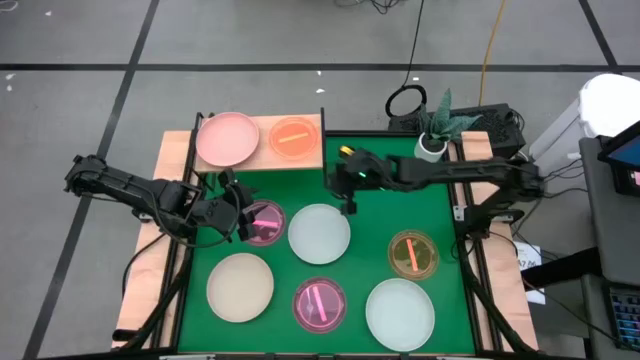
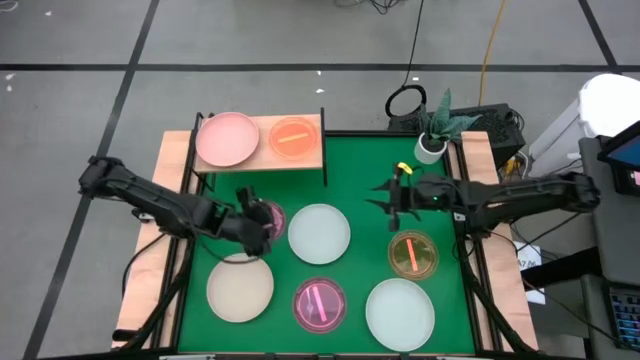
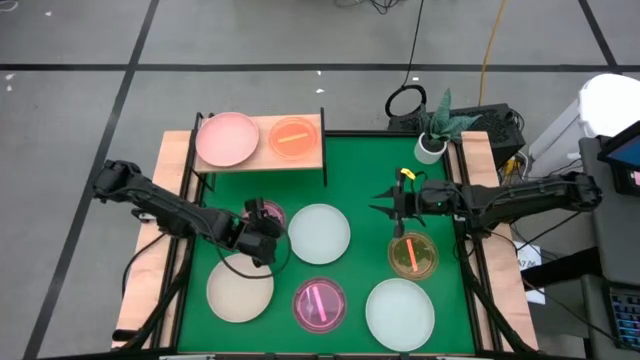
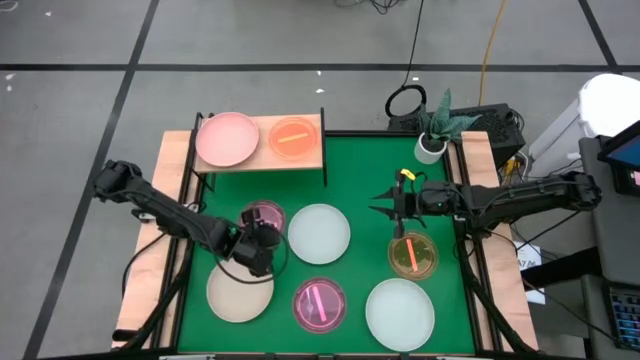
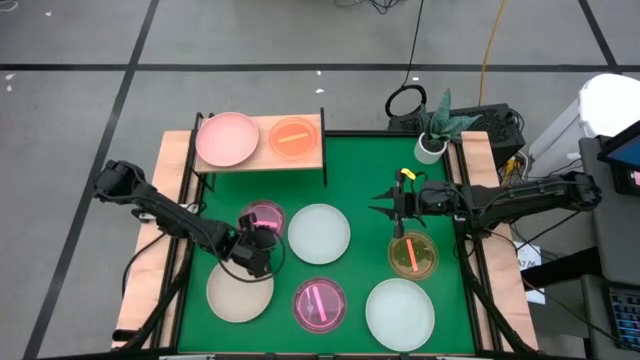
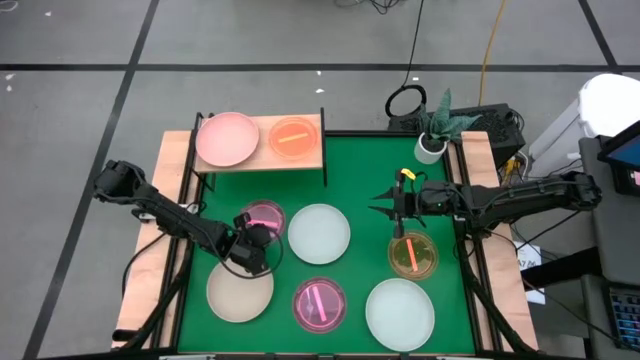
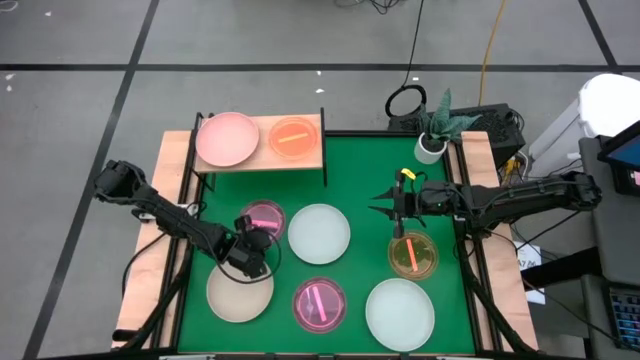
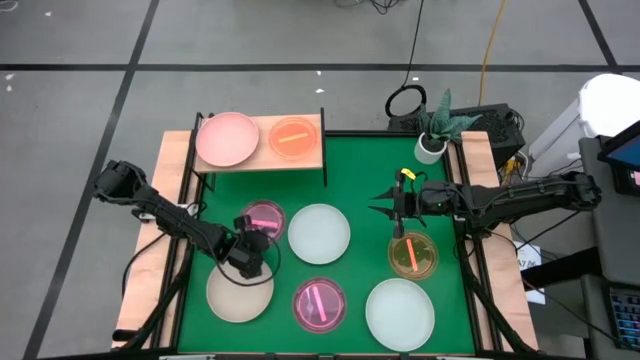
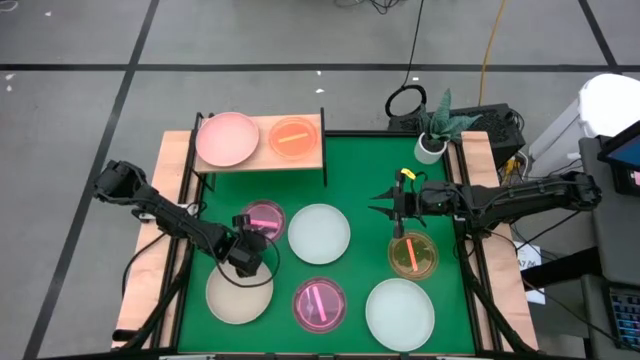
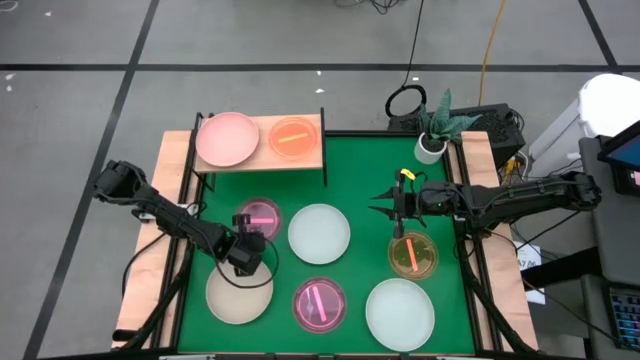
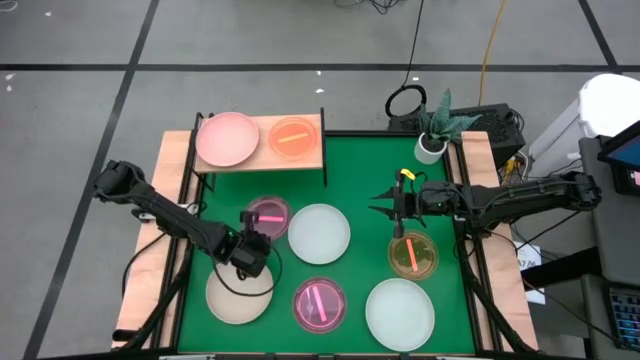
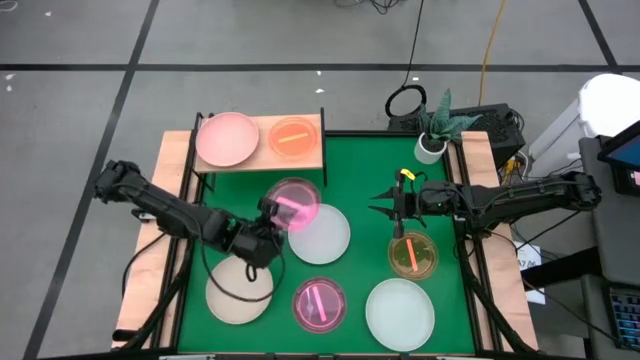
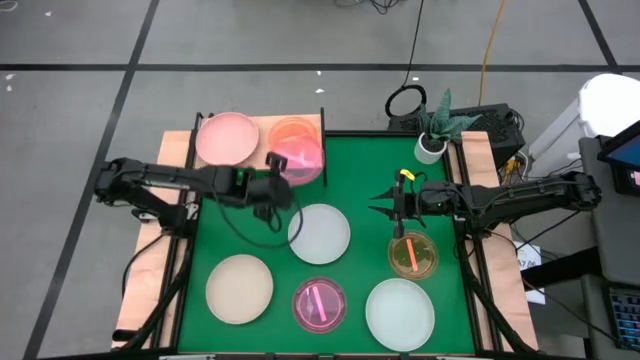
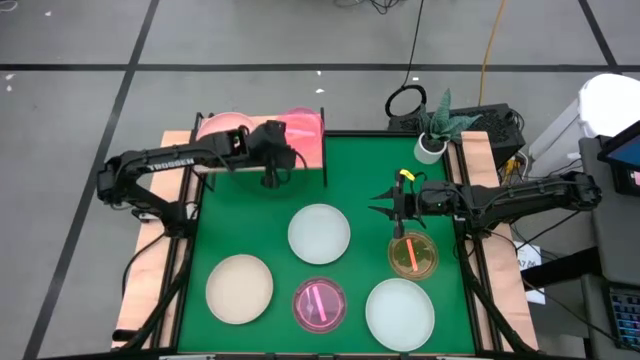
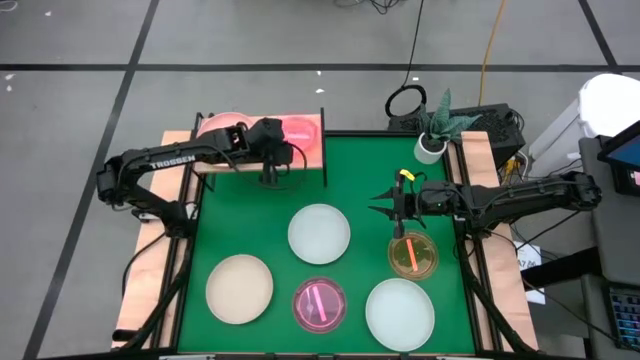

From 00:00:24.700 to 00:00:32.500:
Task: Place and stack plates onto a shelf
Stack the top pink plate on top of the orange plate on the shelf

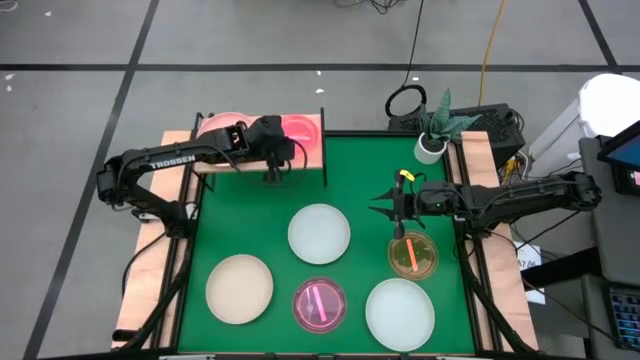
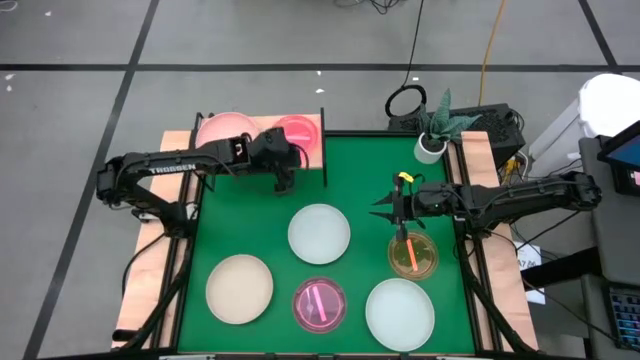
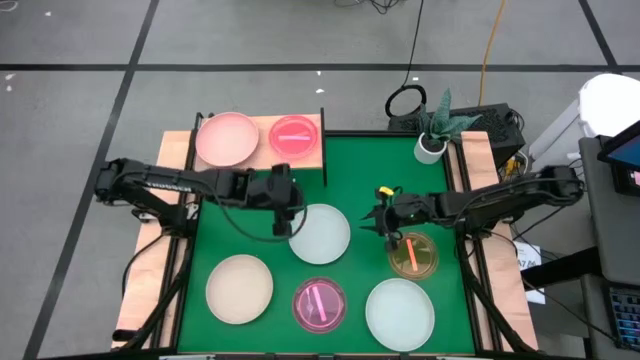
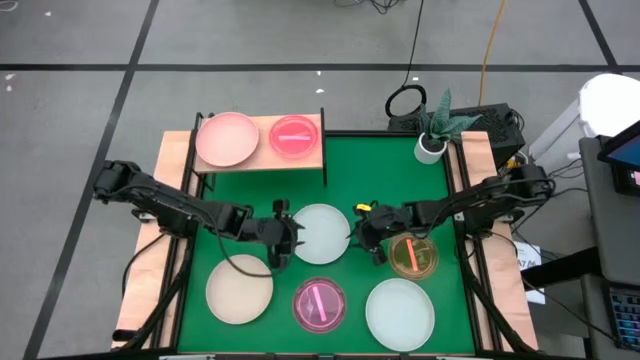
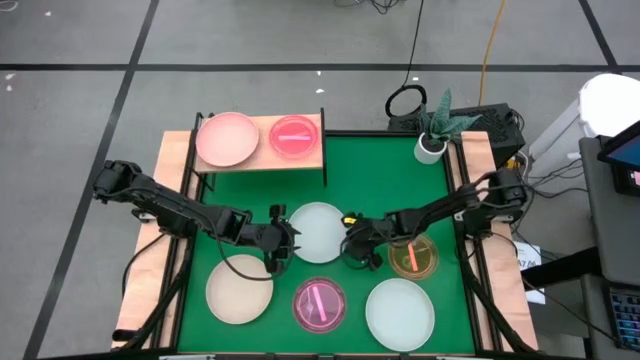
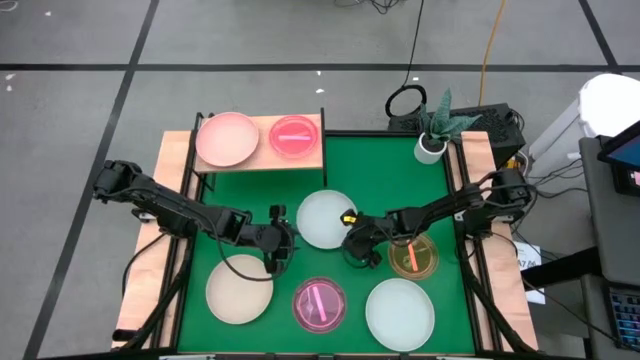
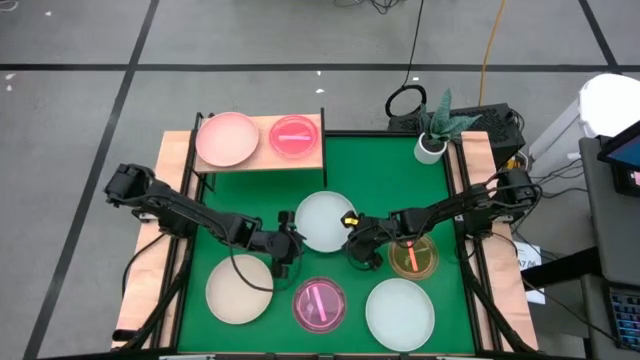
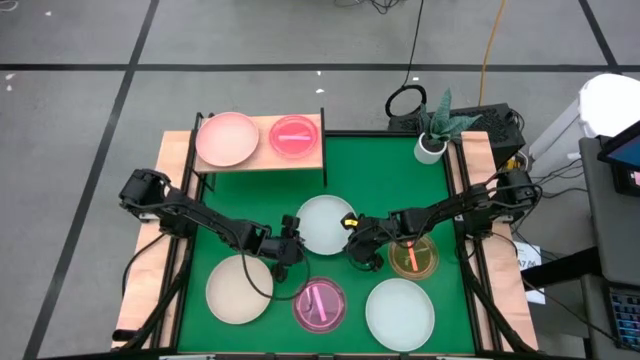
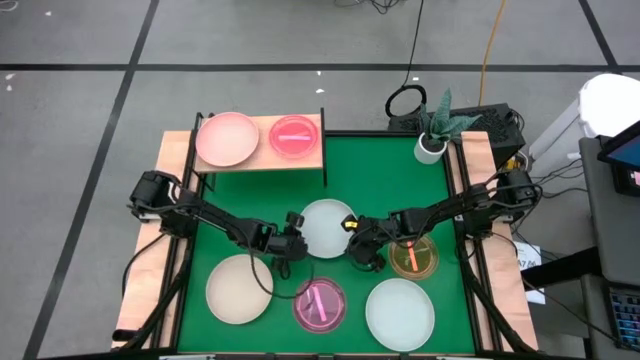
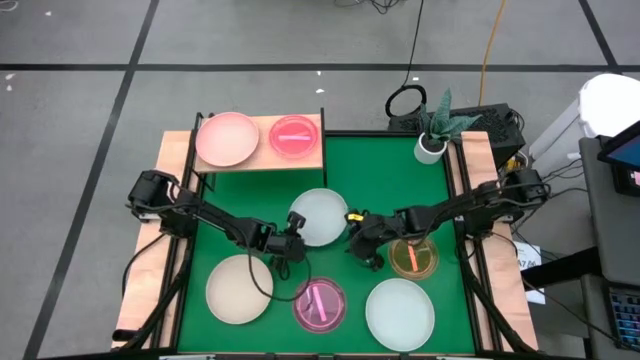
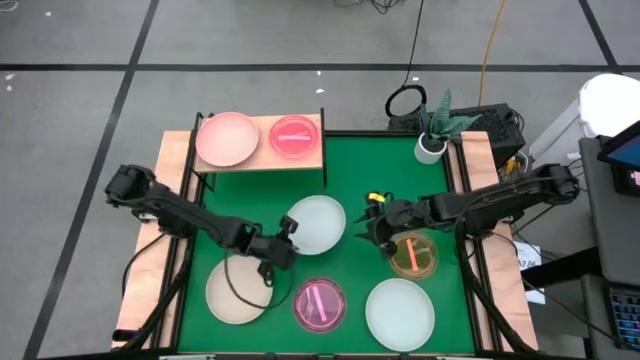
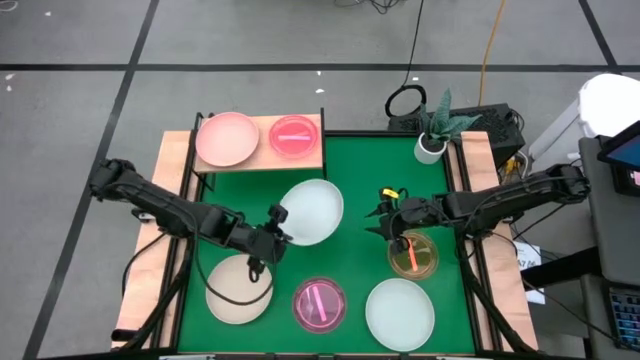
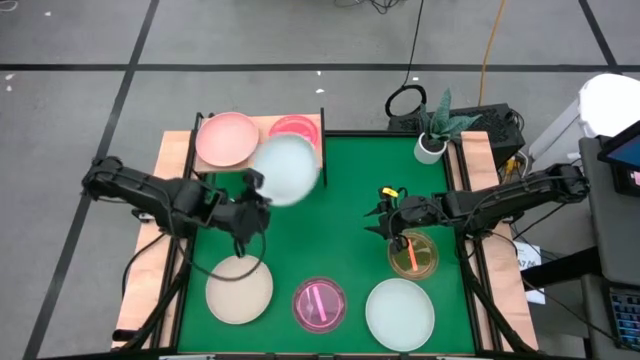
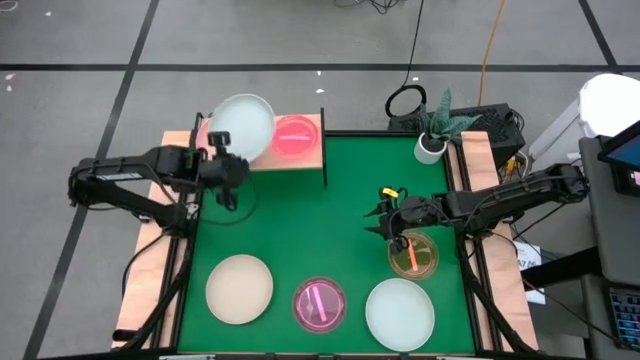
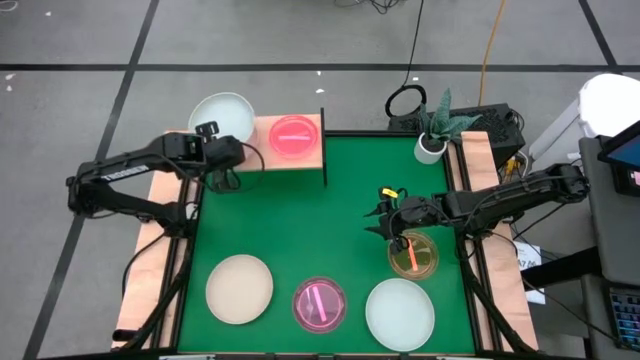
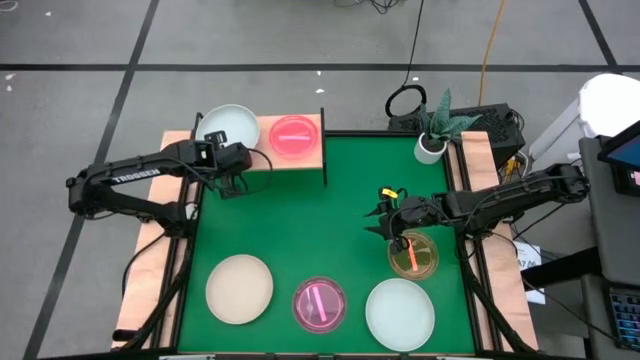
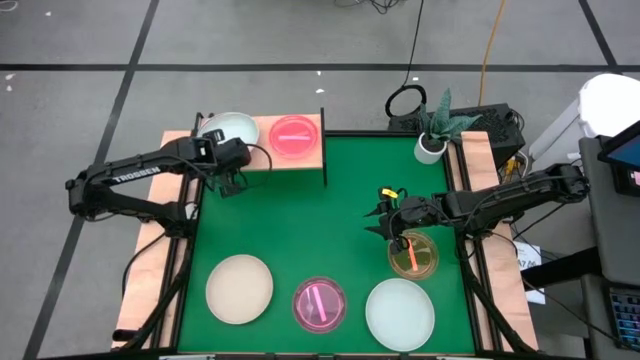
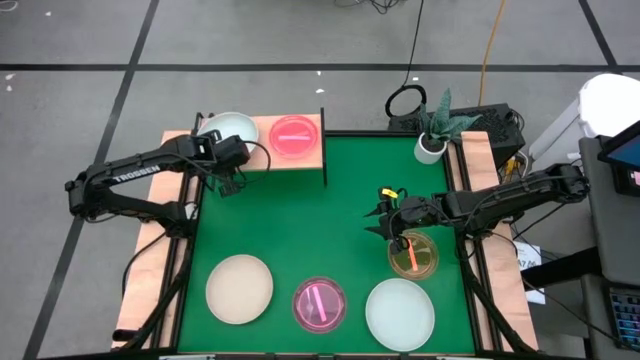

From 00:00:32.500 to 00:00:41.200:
Stack the top gray plate on top of the orange plate on the shelf

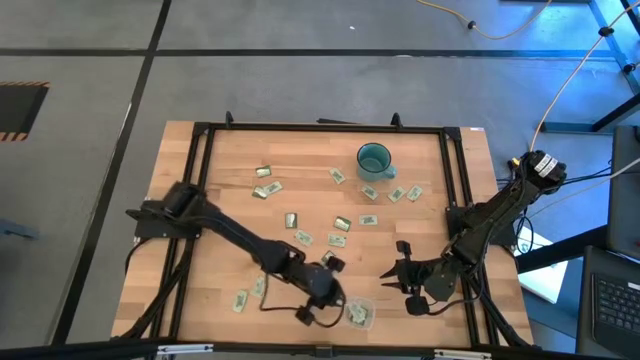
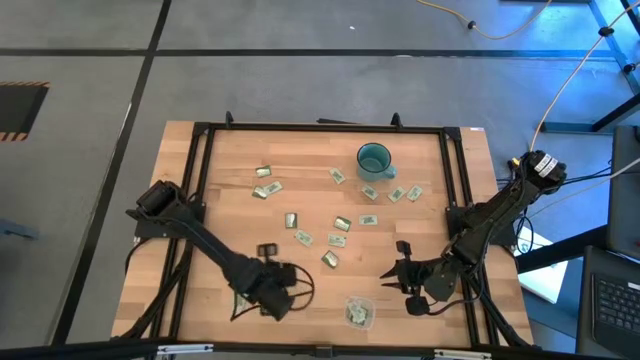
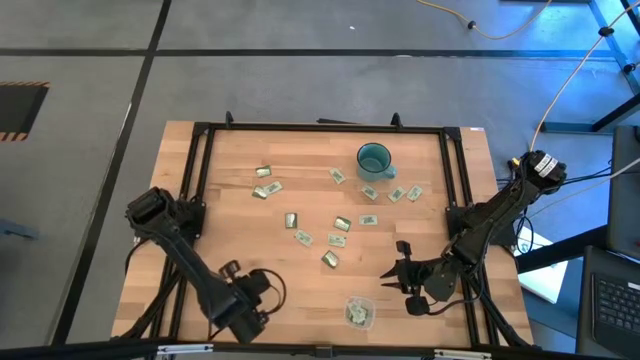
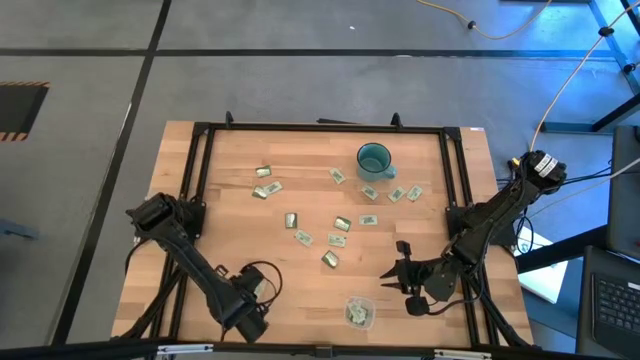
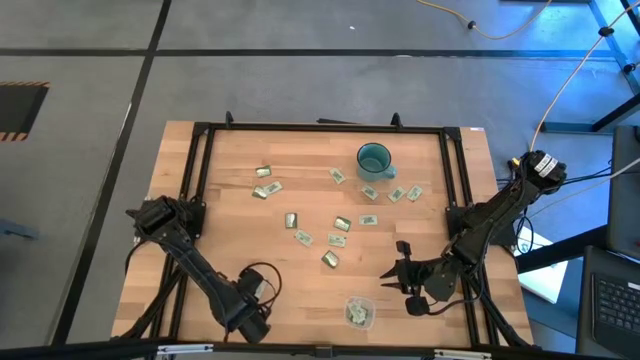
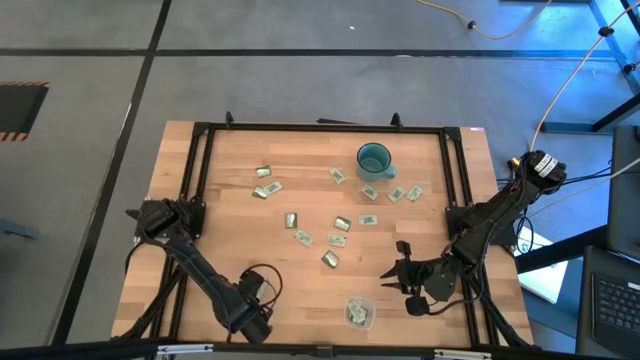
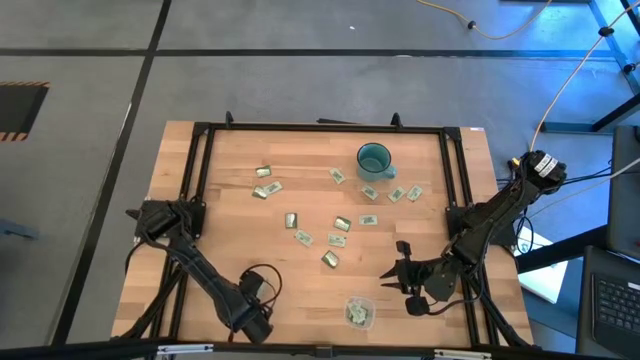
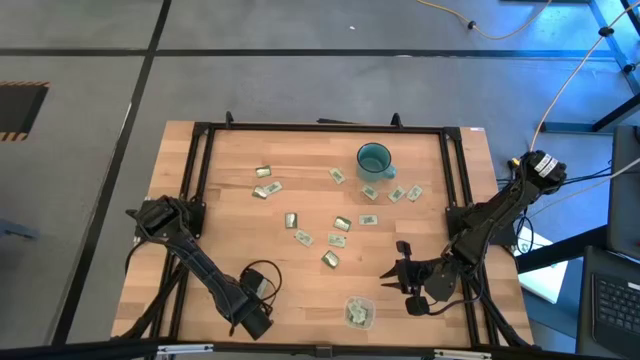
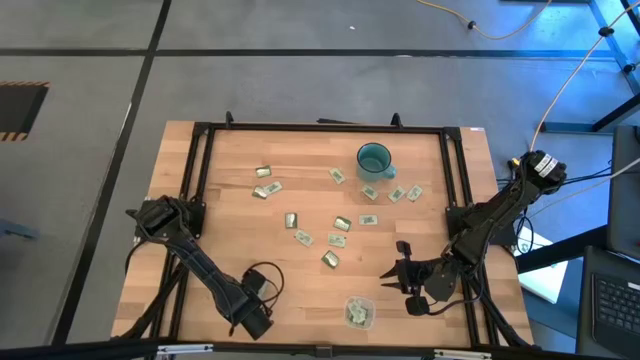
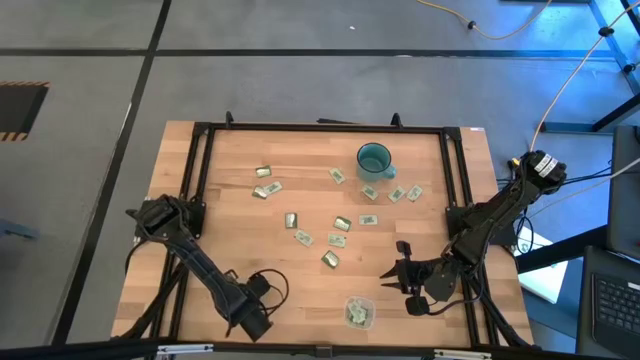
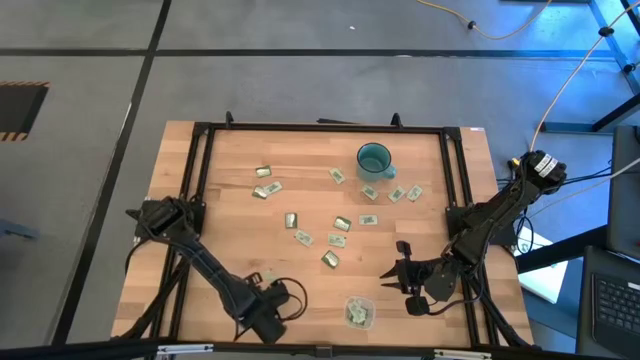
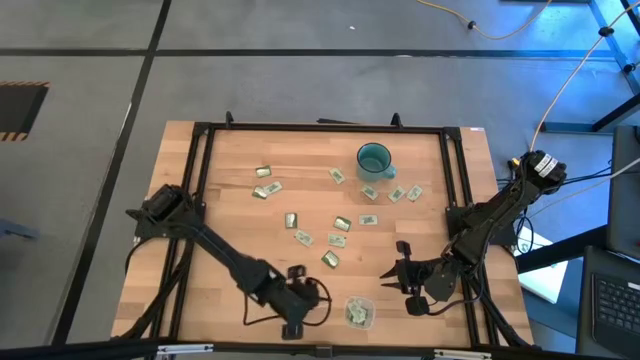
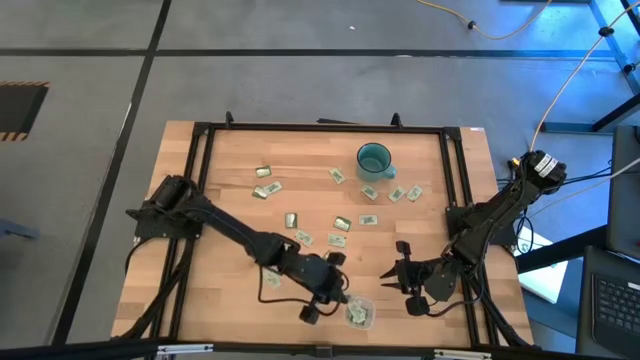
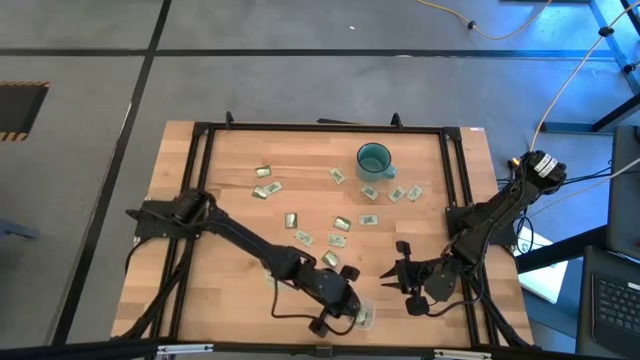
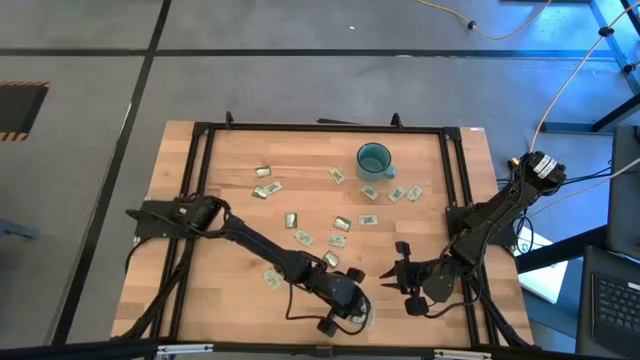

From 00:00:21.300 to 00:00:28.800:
Task: Pick and place items into bin
Put the light green stevia packet into the transparent bin
